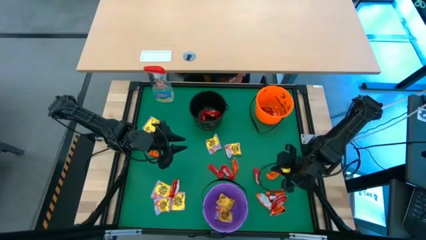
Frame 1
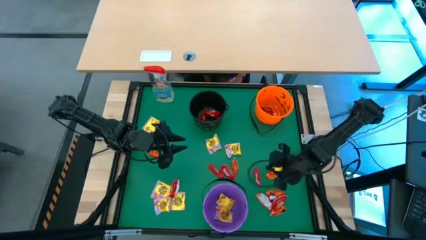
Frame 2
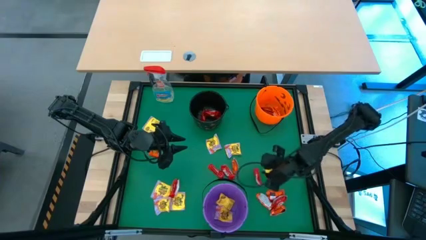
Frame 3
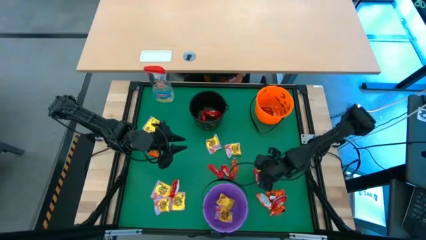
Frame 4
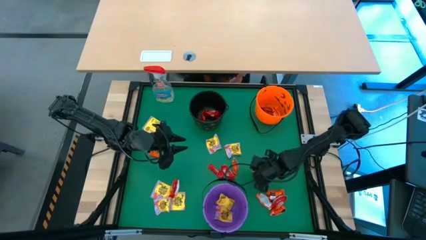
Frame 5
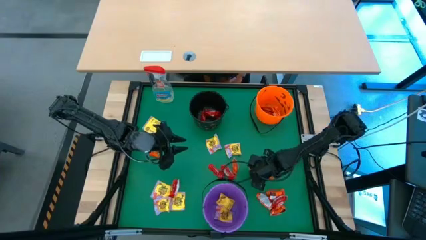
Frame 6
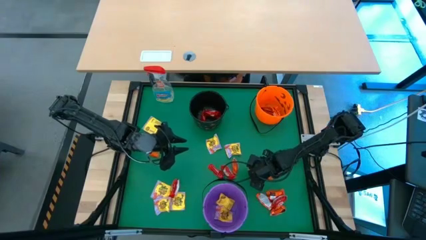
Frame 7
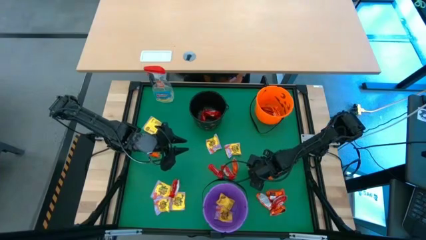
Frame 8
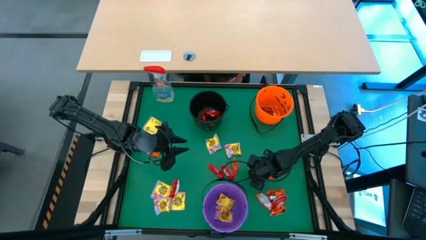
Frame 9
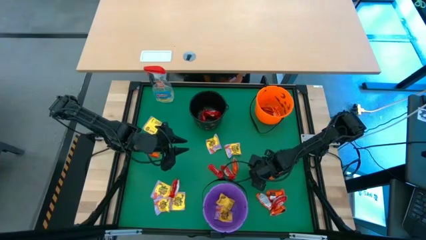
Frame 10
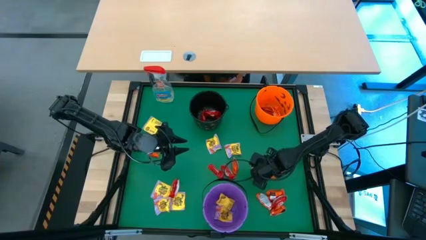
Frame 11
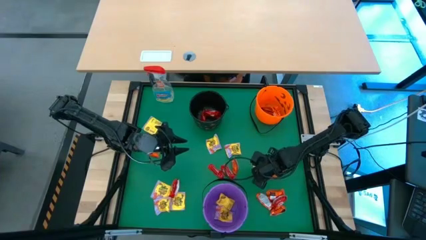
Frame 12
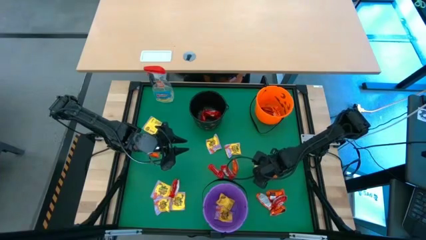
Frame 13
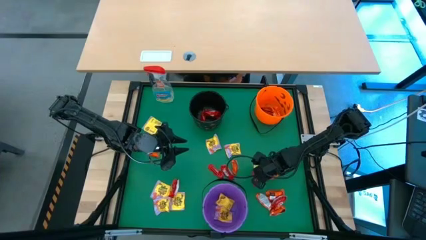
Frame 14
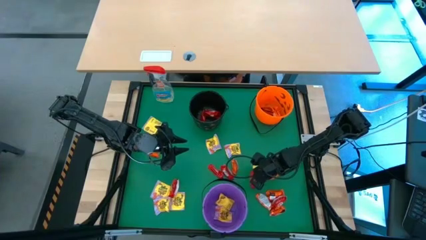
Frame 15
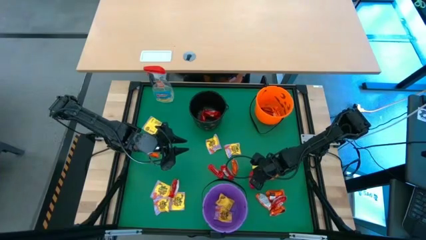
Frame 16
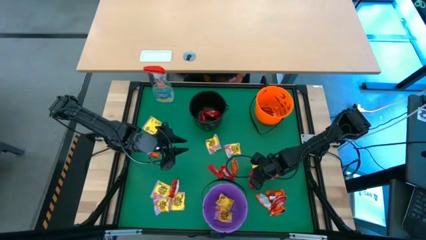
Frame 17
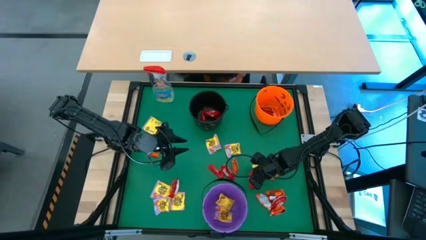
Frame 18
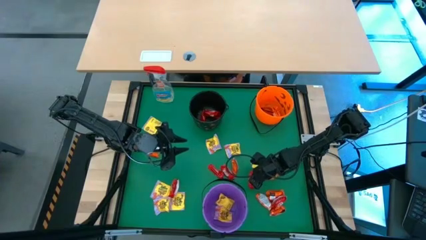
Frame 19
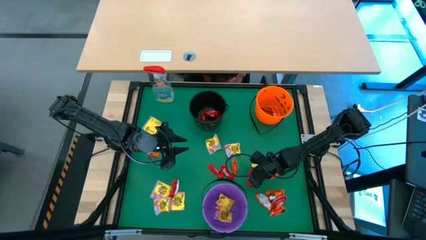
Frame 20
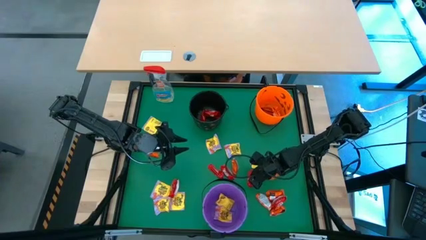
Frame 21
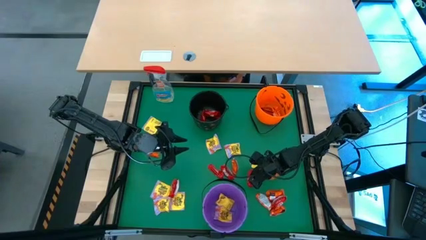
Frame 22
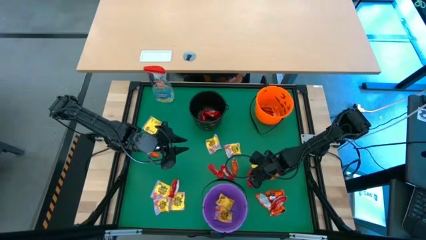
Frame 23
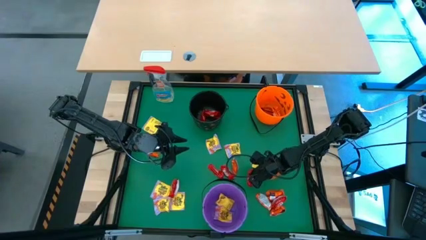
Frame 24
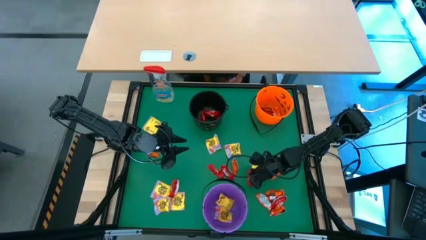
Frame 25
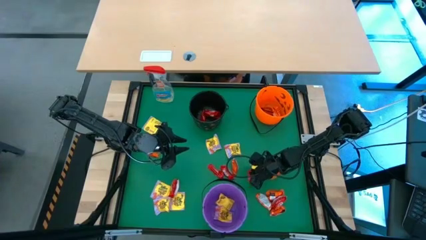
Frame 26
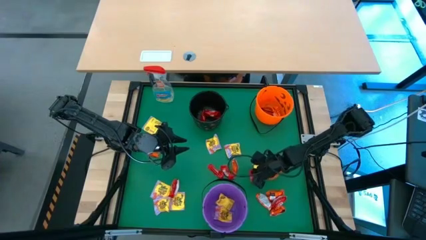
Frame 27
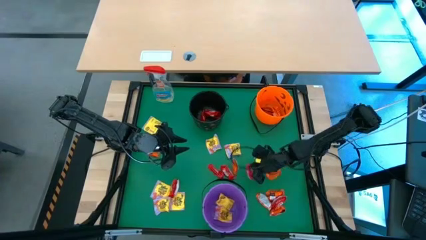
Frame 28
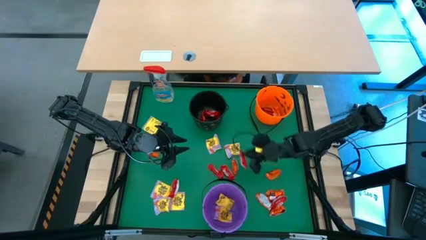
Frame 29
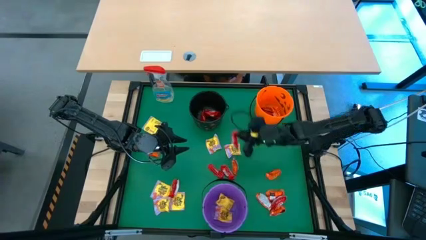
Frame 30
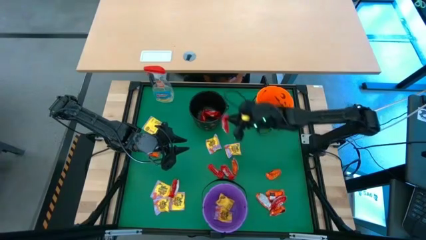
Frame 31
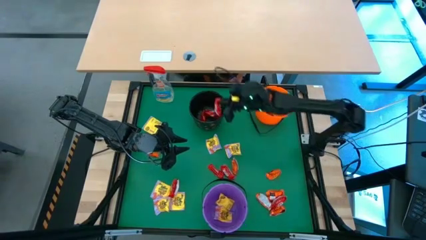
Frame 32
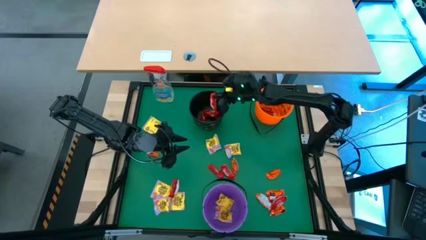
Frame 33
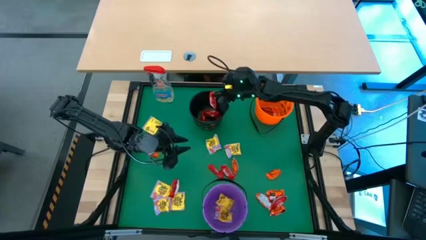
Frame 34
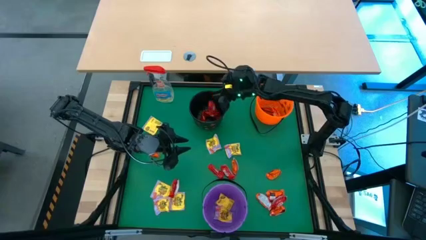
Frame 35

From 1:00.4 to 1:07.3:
Task: Sort candy
Put the red chocolate into the black bucket

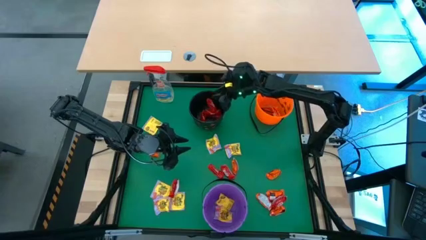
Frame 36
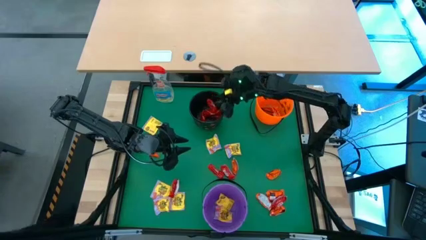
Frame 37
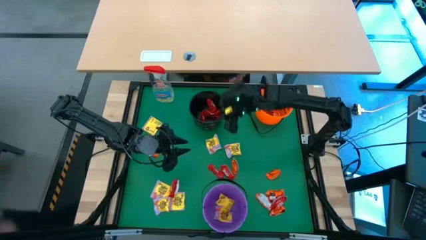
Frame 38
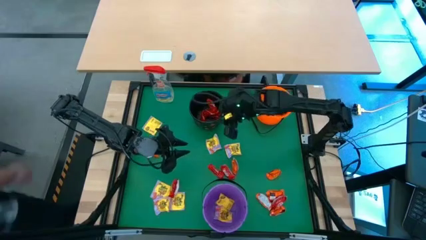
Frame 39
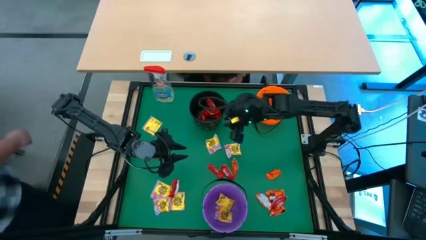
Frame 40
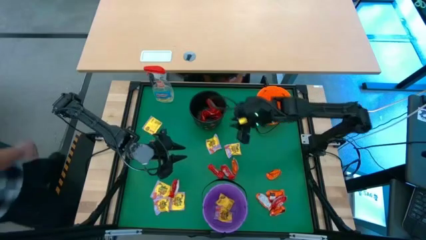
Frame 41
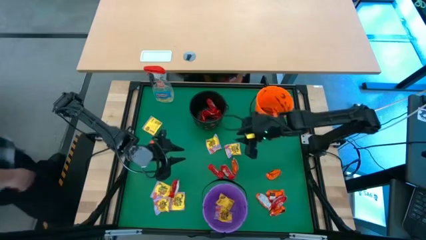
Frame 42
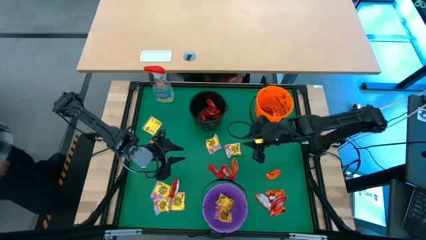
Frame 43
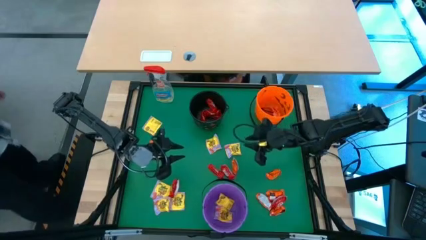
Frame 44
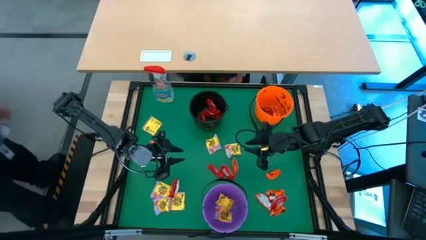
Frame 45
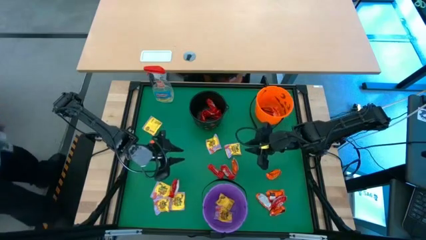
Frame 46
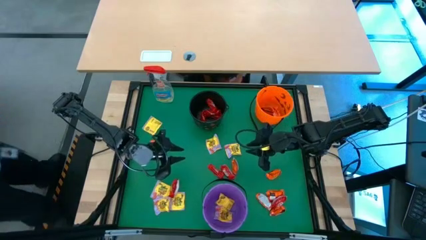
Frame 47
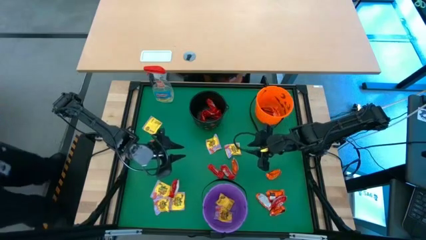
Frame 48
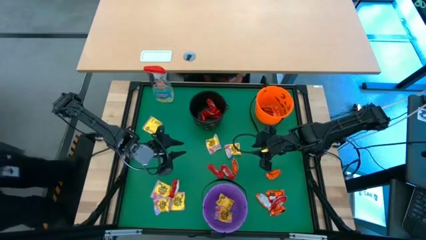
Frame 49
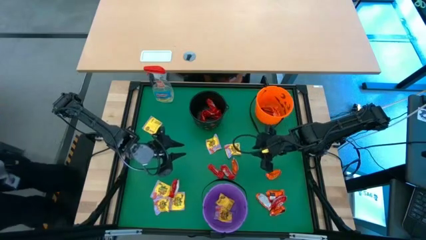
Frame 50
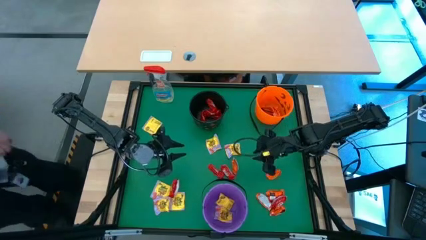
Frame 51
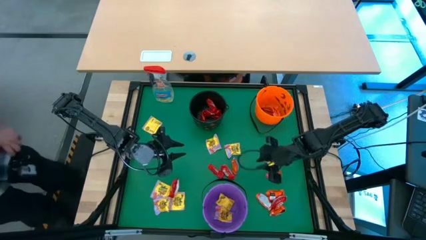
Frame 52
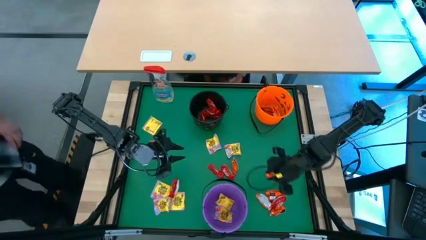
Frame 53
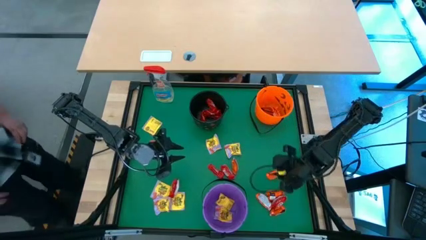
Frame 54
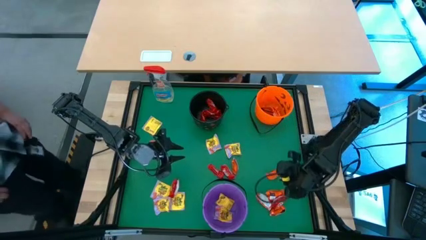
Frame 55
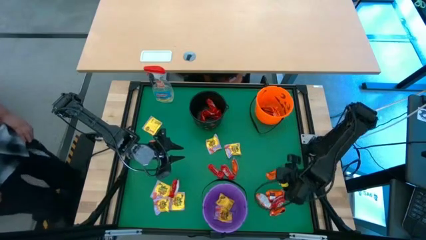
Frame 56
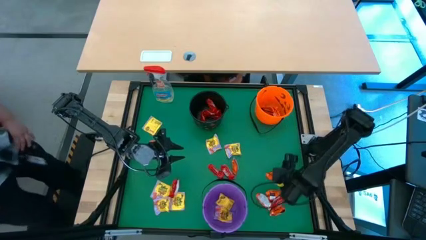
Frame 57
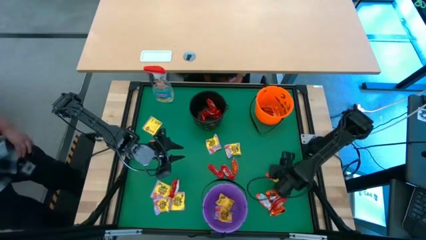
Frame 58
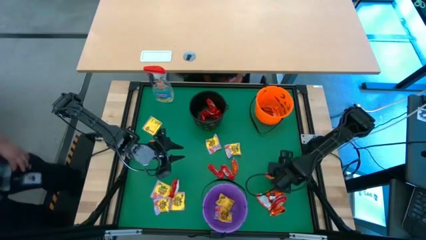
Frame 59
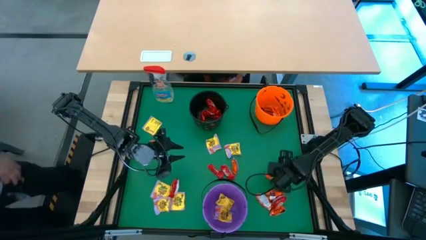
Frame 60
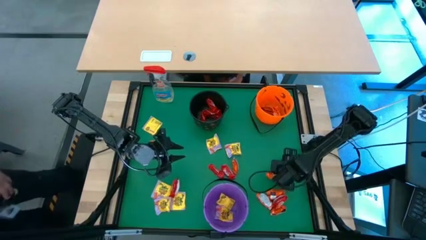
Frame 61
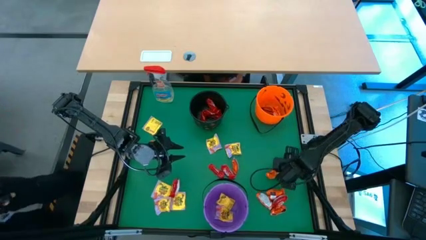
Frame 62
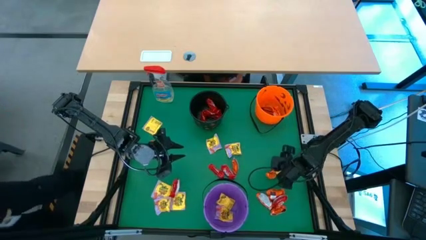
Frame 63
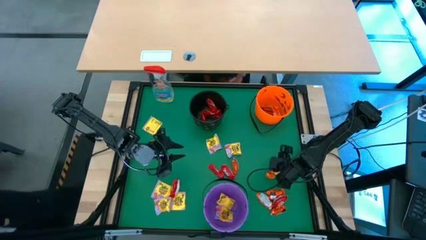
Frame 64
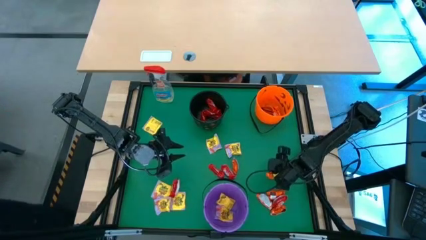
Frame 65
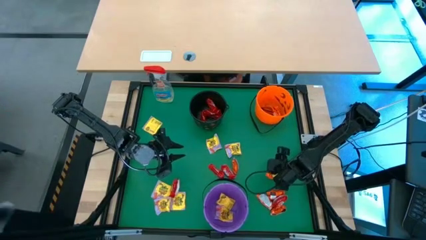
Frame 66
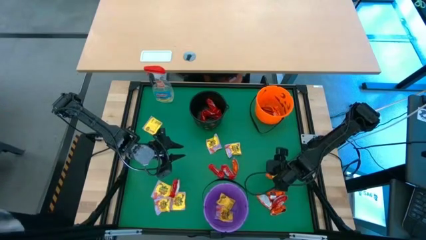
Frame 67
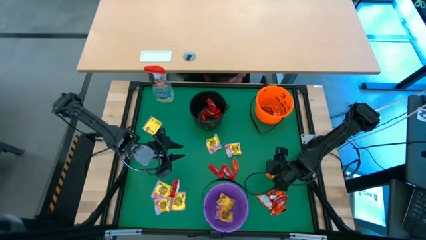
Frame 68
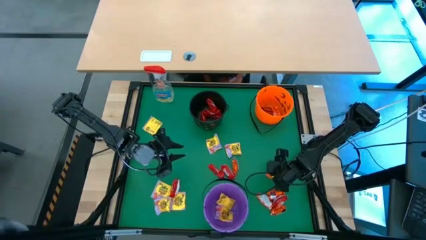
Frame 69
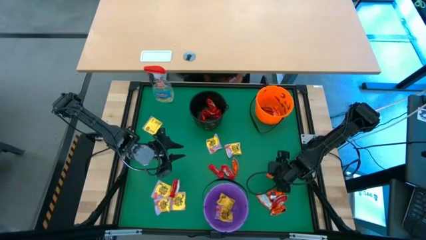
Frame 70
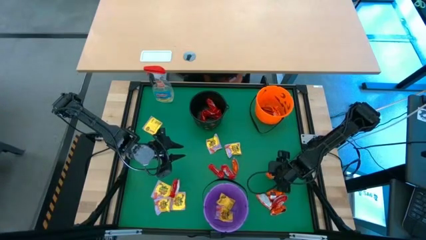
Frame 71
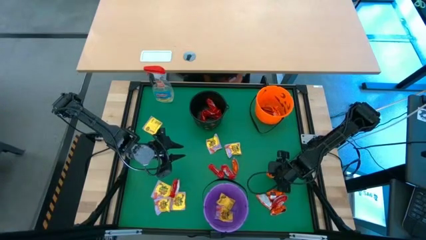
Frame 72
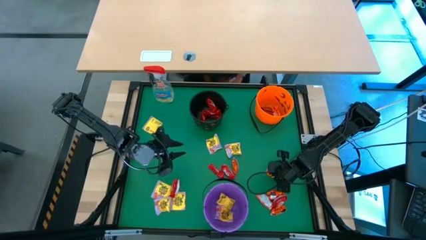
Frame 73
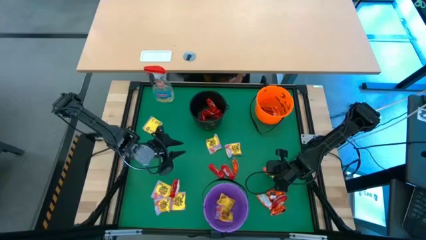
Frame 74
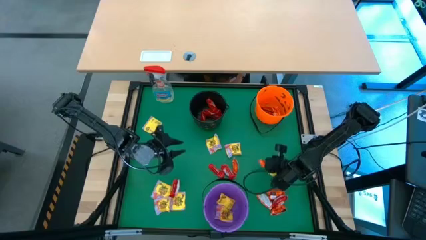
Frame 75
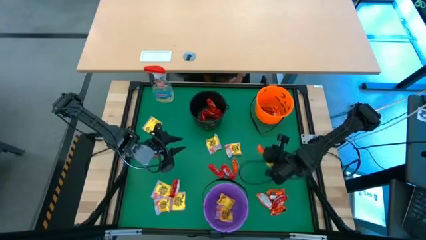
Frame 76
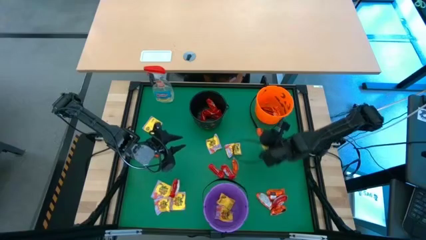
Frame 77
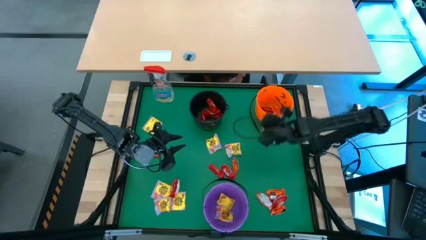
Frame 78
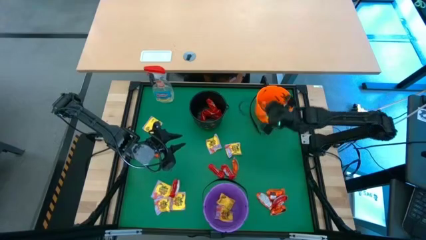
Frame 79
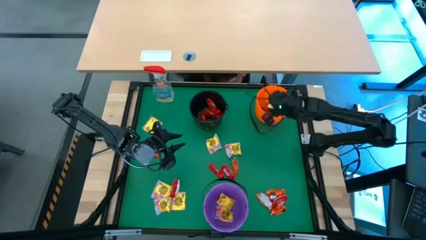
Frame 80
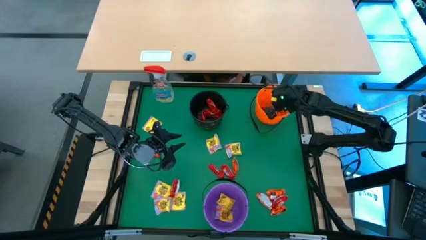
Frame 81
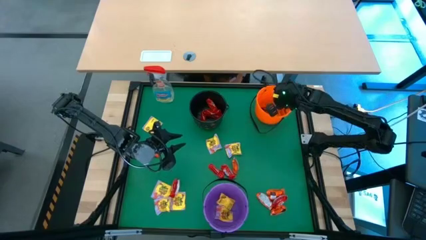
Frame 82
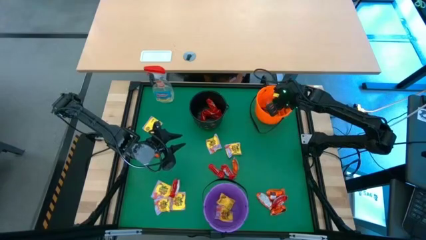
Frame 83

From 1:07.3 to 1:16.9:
Put the orange chocolate into the orange bucket
